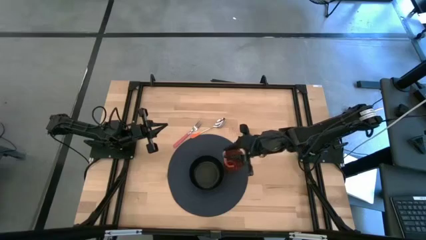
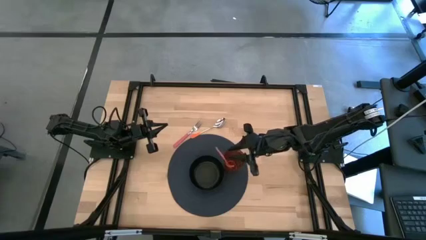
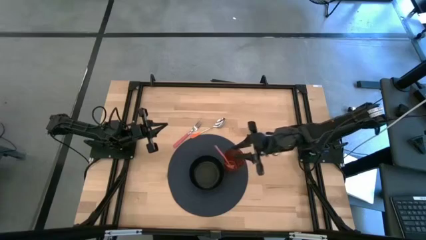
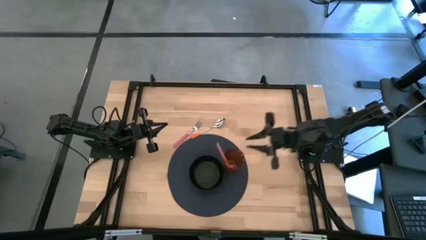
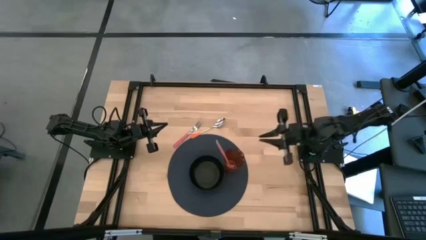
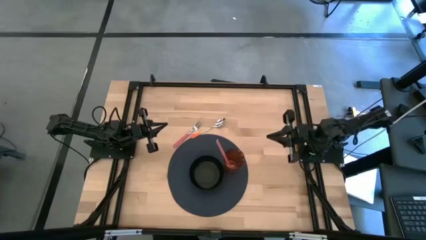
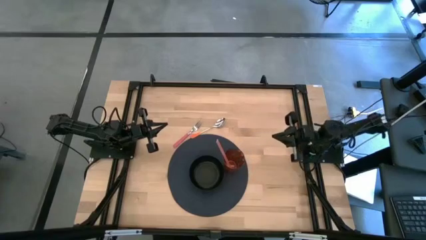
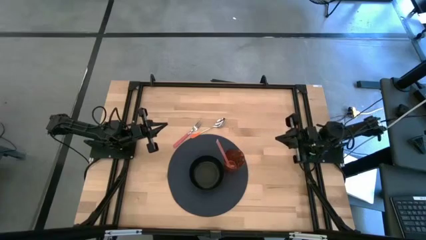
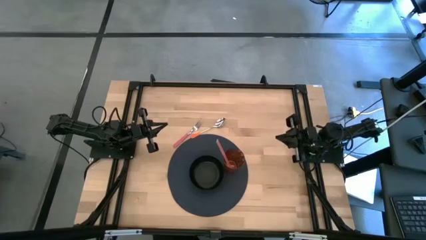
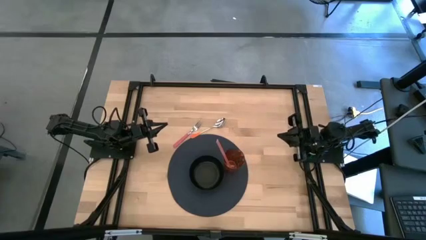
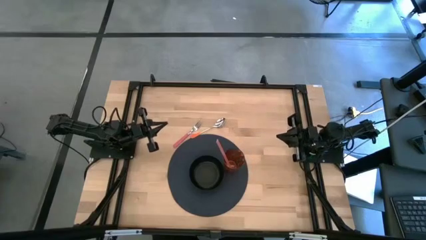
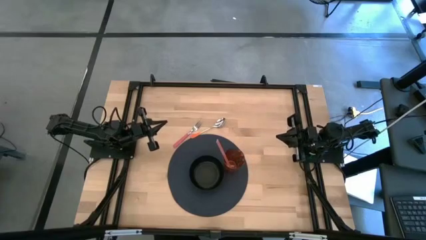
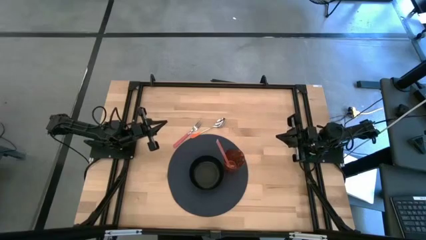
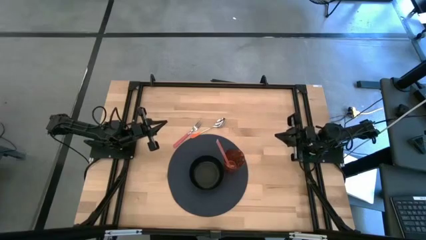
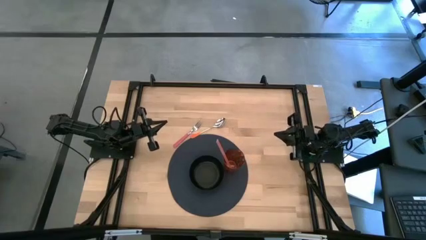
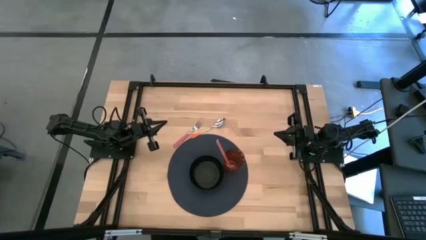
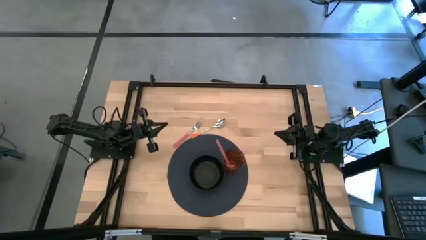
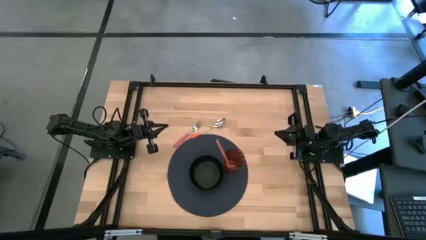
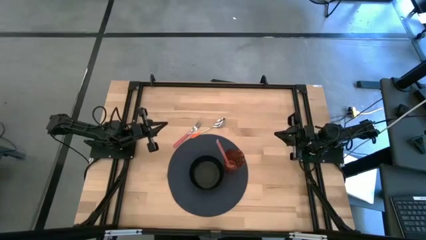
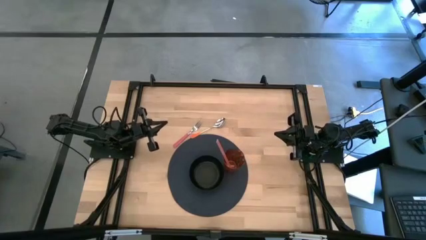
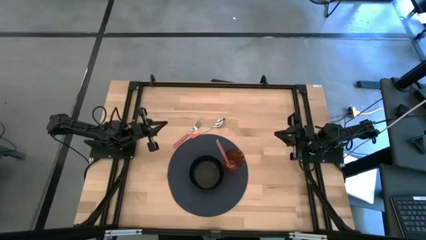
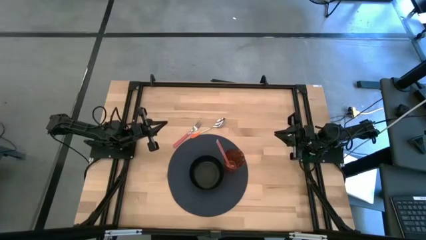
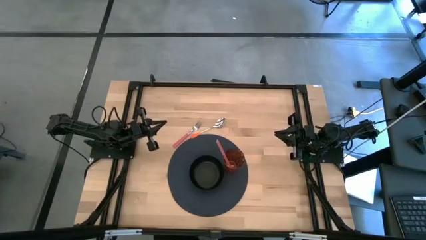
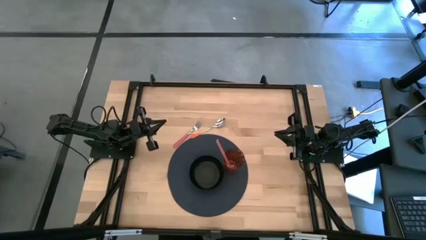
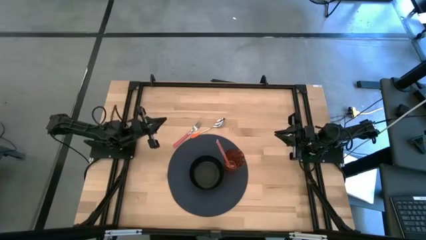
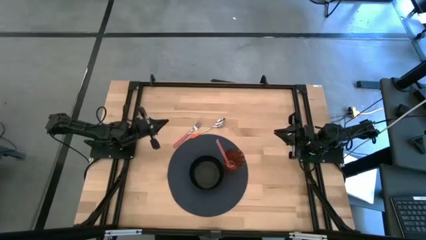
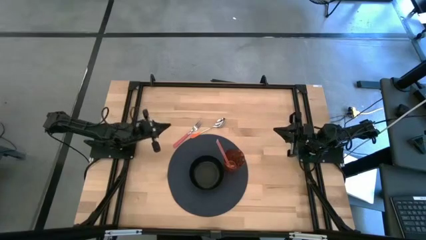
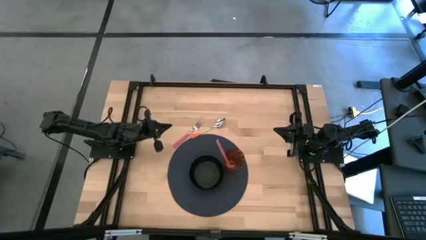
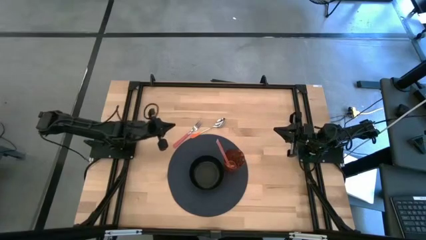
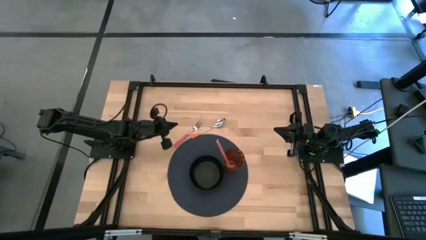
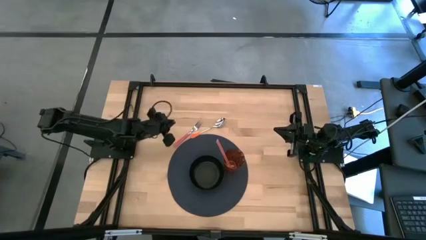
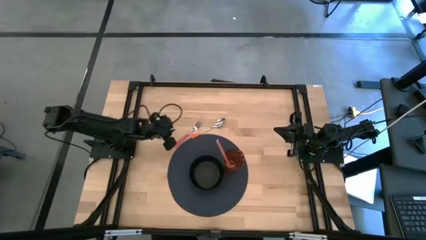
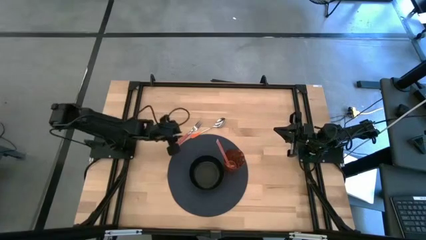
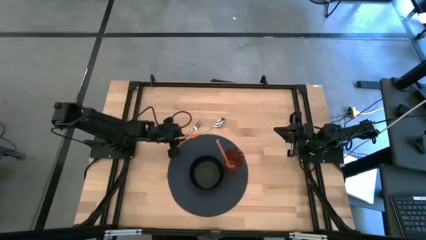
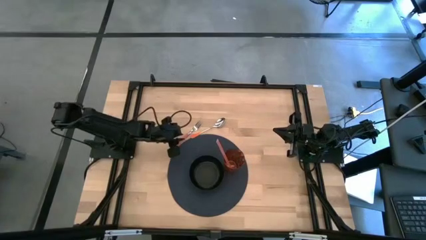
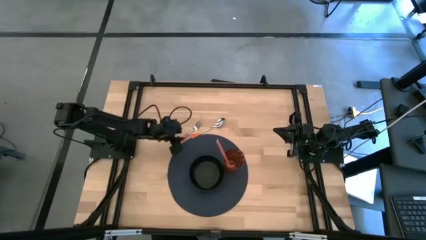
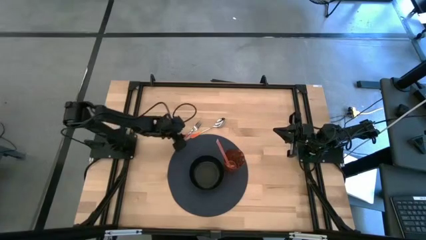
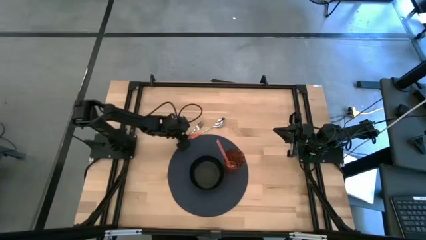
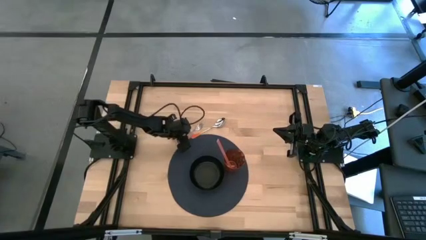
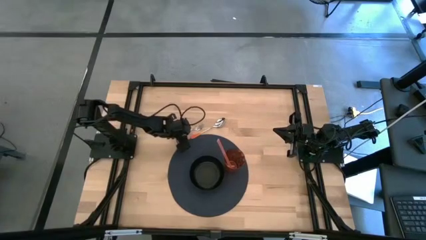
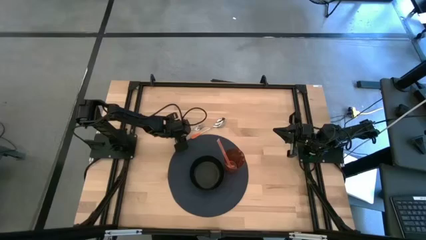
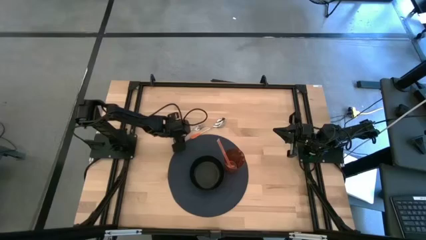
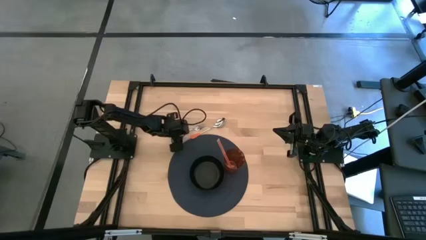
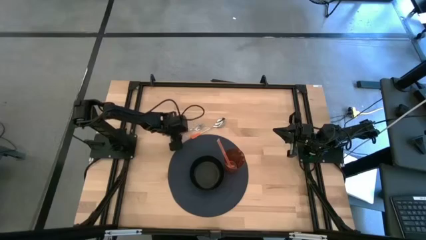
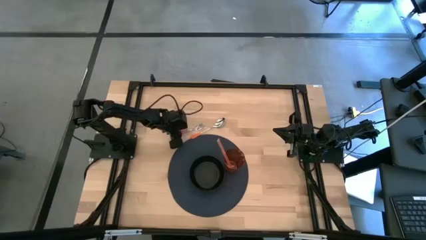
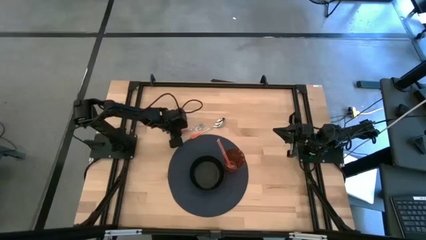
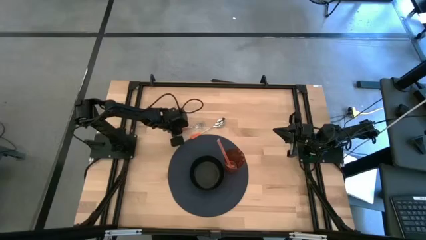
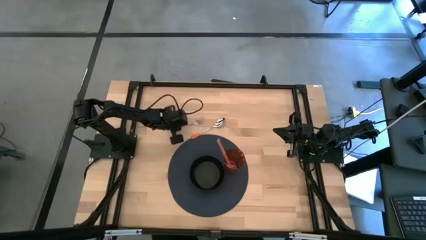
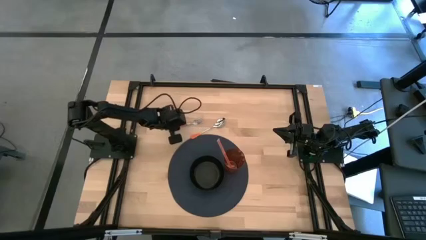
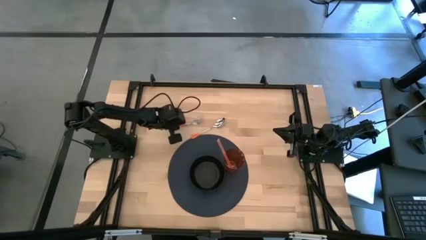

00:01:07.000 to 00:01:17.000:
Task: Pick & Place Utensil
Put the pink fork into the black bowl

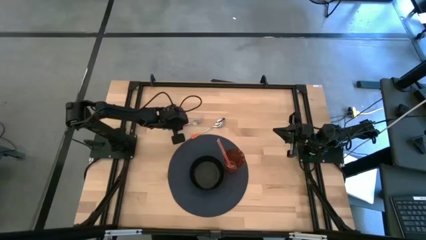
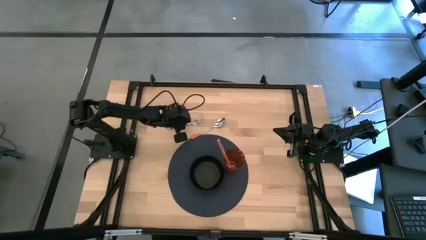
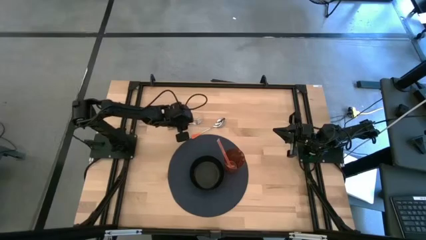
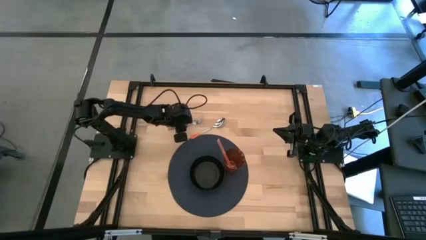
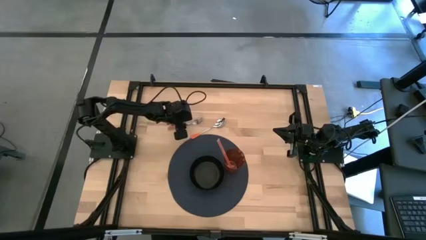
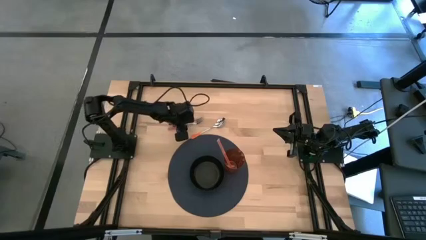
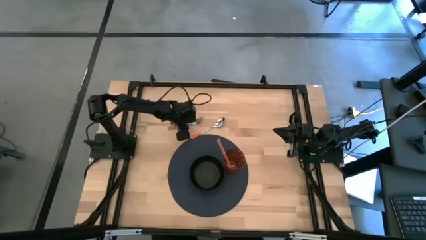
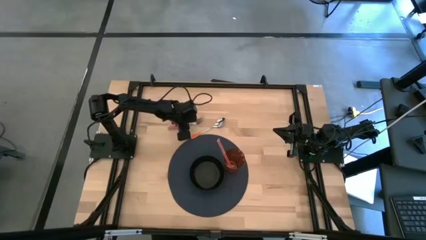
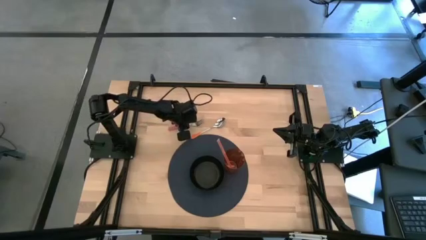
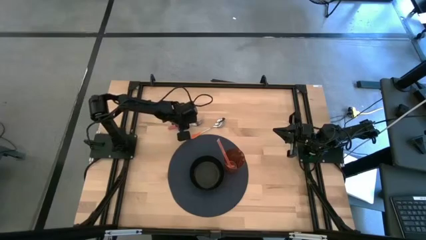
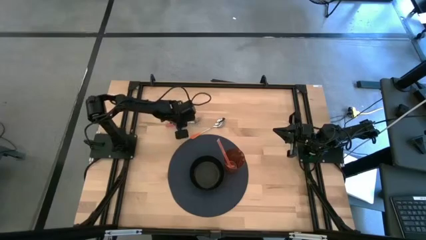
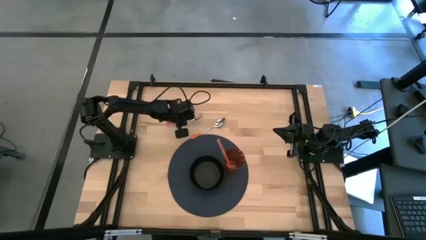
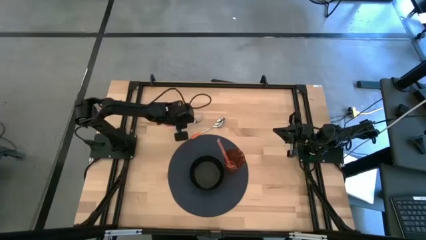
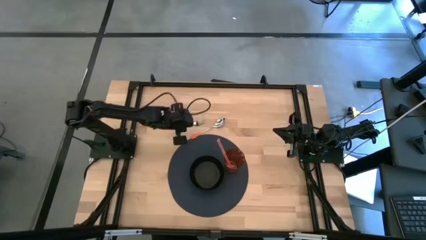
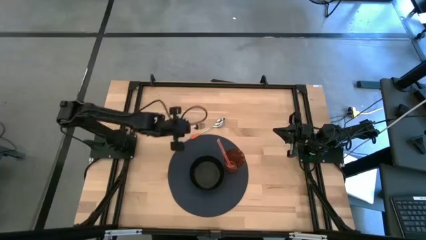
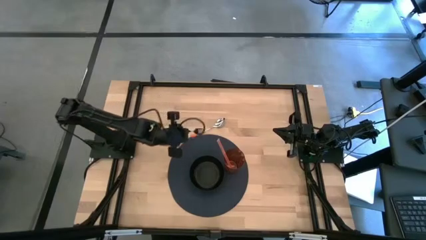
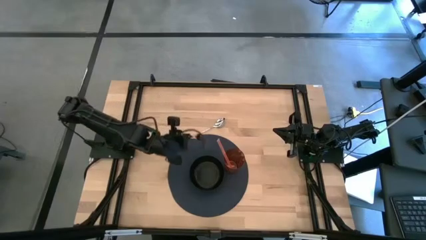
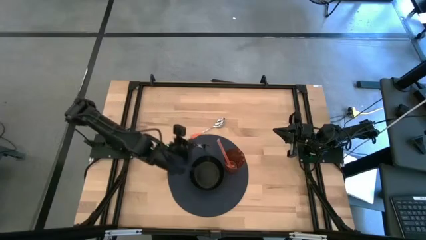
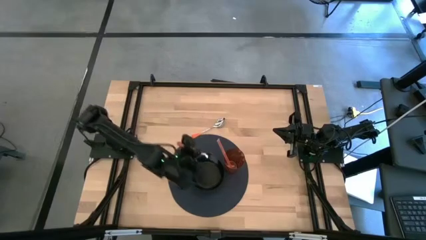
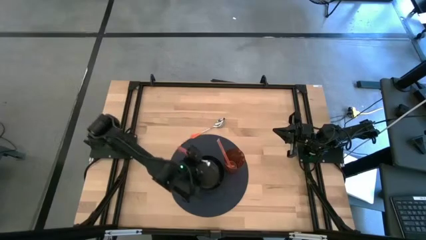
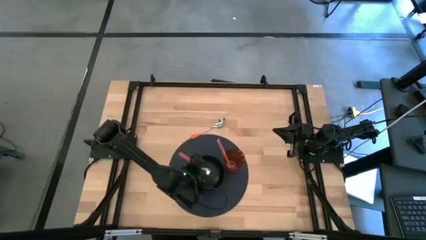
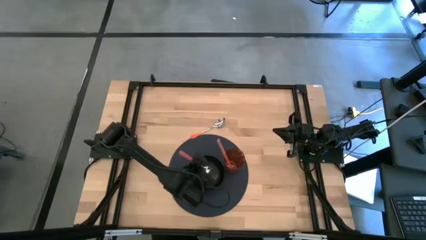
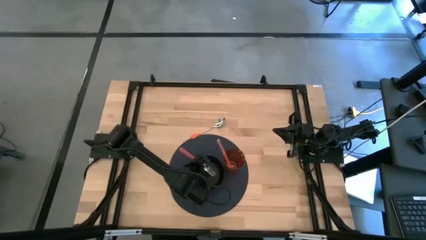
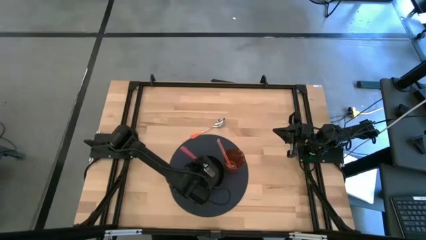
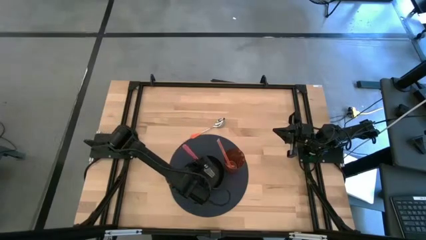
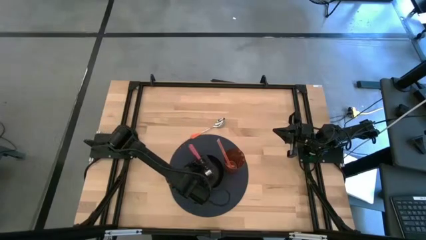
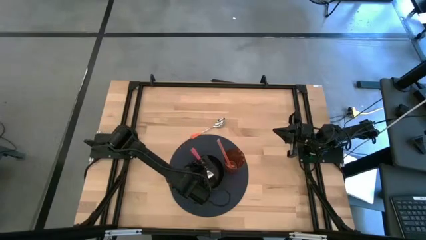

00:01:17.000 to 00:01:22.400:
Put the pink fork into the bowl
